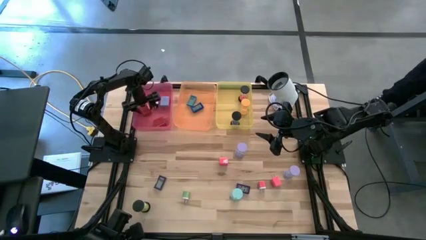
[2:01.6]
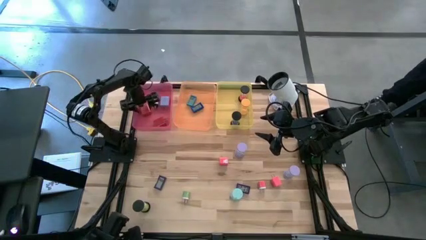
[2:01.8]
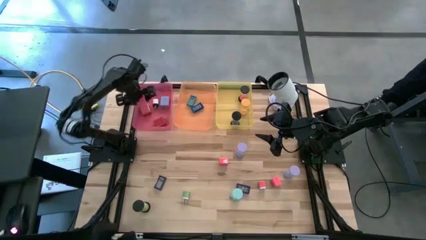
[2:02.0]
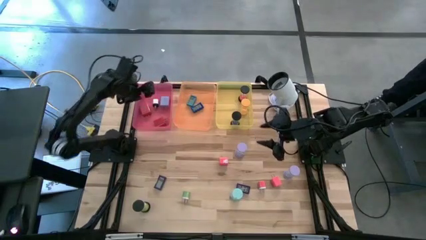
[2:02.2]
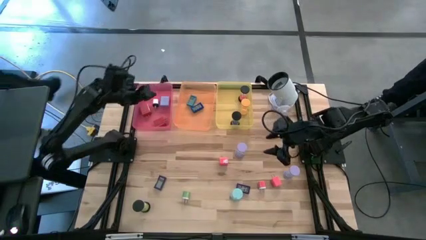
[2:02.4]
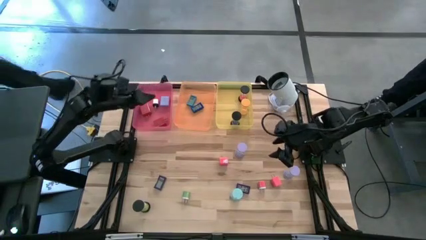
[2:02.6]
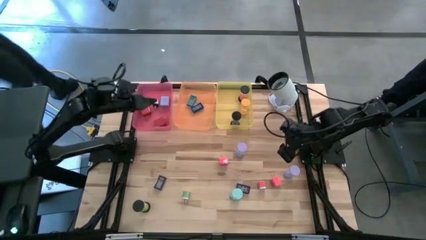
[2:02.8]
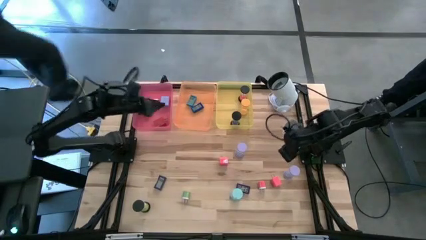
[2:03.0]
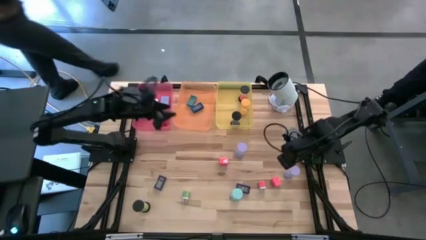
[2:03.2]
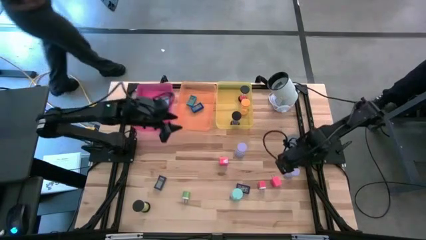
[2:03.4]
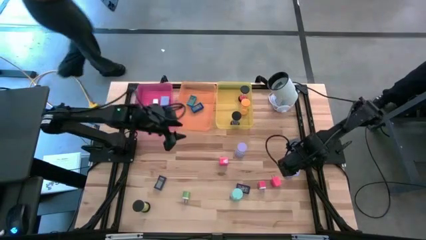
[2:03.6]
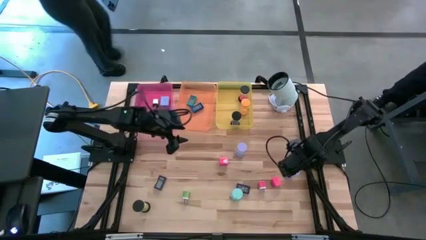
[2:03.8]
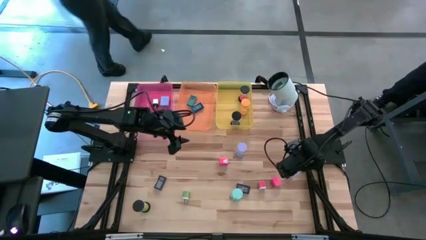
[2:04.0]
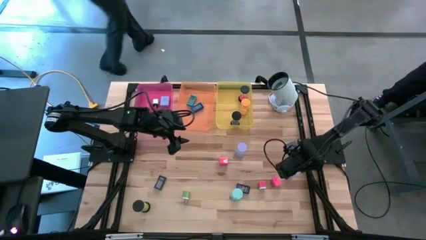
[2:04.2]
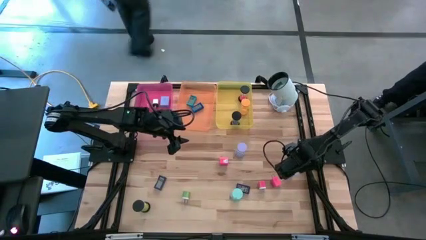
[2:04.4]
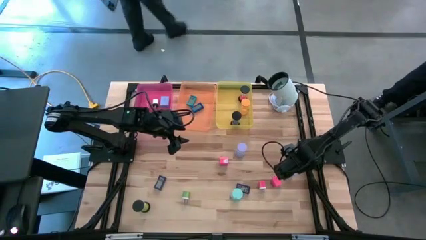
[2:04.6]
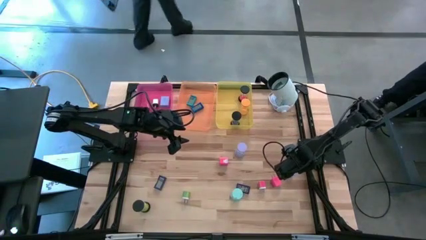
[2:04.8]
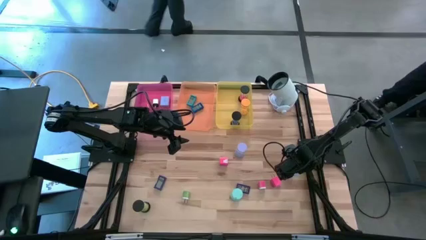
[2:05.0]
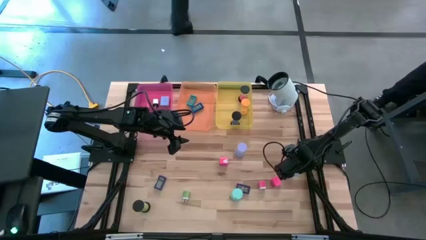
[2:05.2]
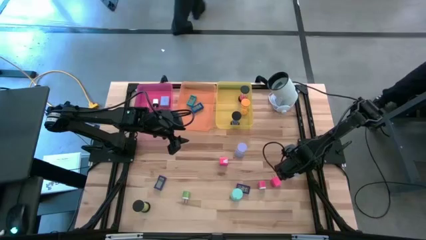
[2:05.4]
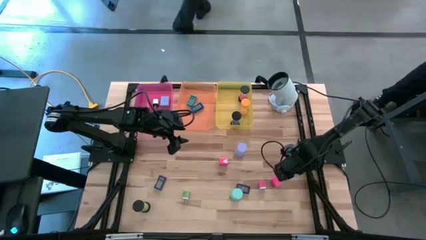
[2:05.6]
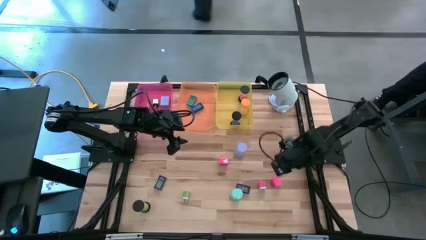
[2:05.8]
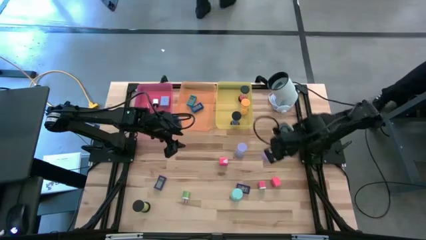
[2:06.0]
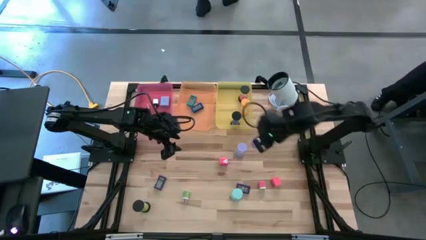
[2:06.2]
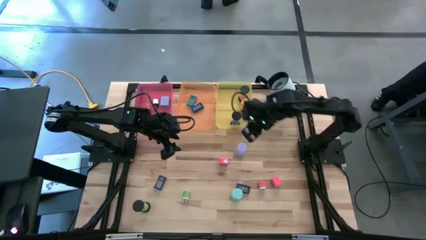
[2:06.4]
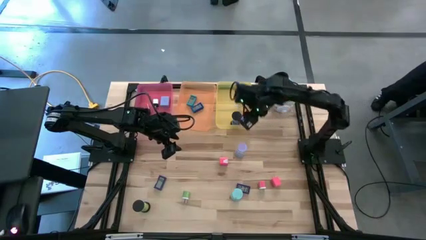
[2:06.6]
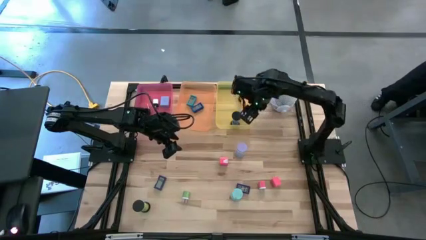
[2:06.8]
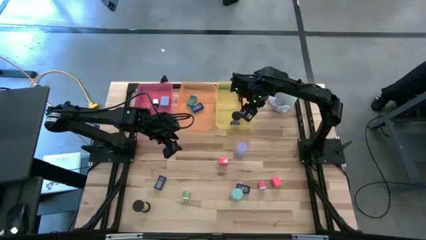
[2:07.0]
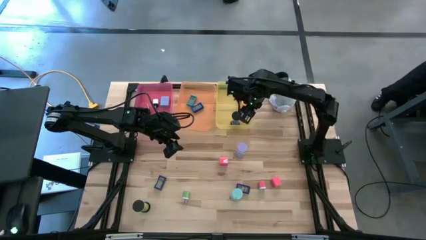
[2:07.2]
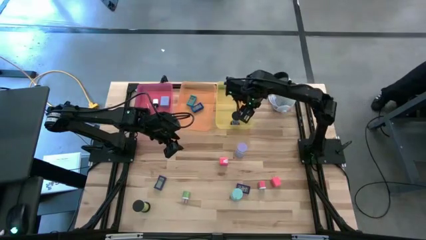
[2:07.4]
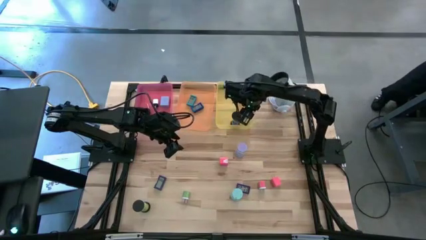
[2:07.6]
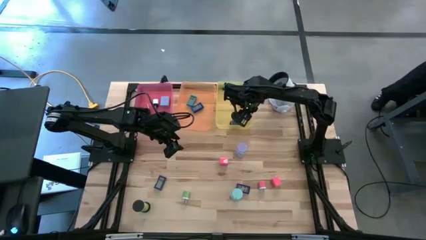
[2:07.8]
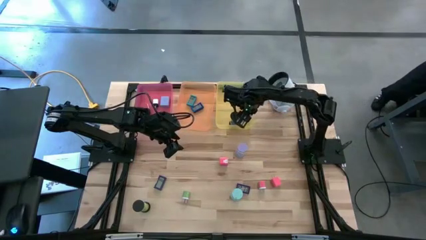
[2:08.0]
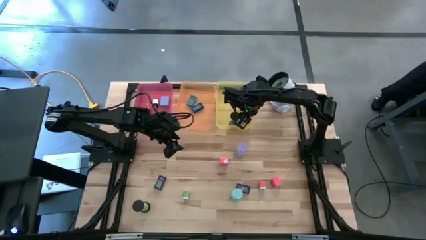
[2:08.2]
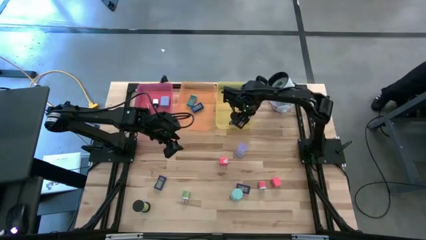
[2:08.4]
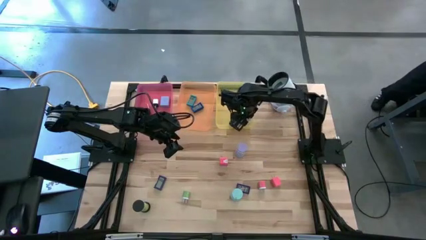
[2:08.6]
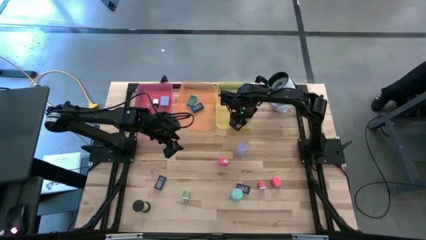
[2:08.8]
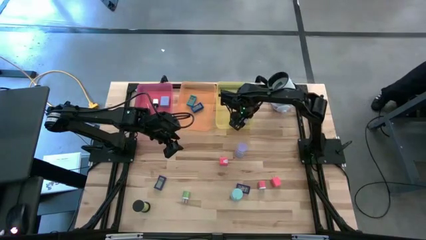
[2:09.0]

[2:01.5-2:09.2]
Task: Pick & Place Office items
Put the bottom violet hourglass into the yellow bin

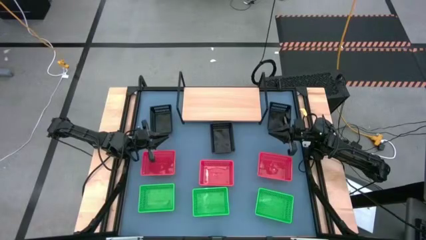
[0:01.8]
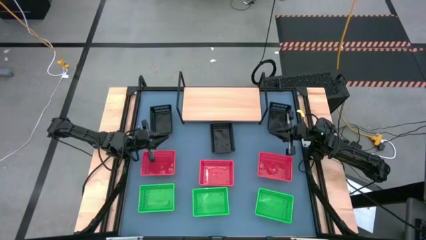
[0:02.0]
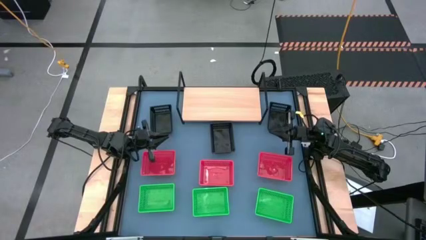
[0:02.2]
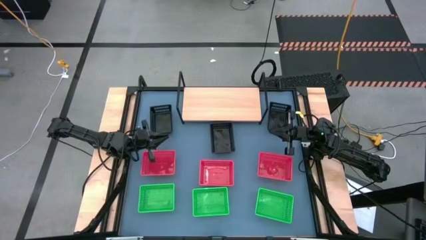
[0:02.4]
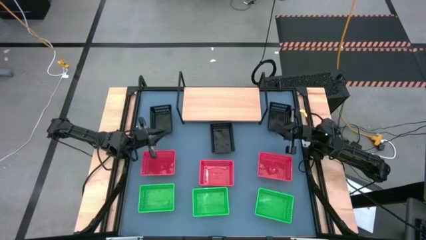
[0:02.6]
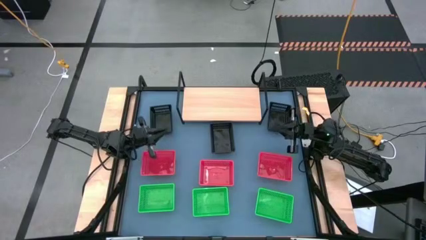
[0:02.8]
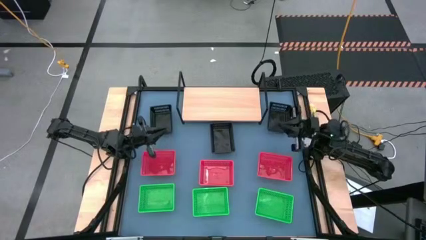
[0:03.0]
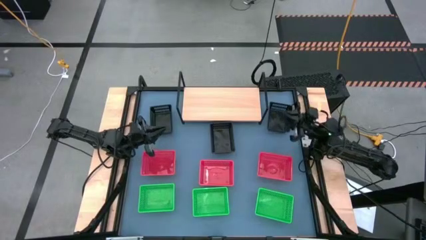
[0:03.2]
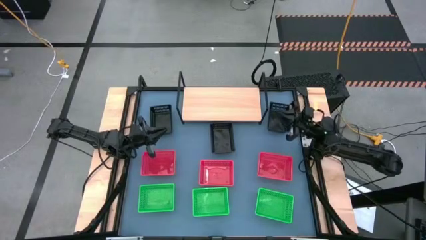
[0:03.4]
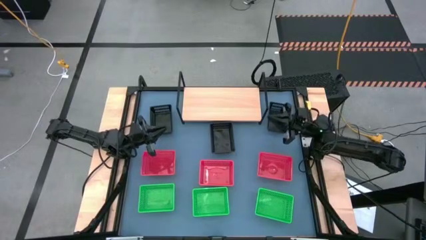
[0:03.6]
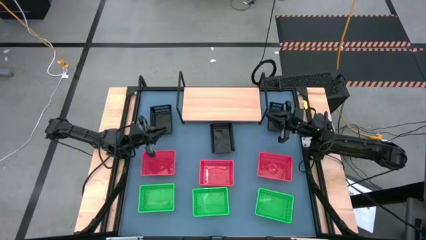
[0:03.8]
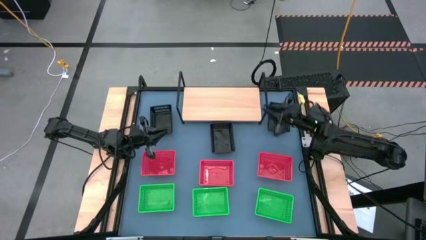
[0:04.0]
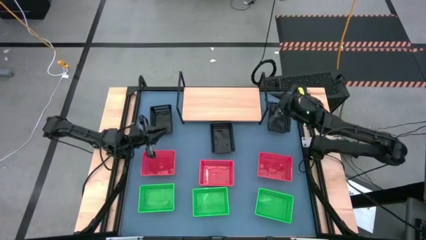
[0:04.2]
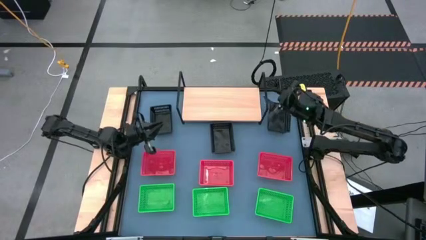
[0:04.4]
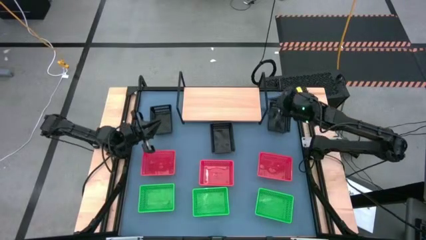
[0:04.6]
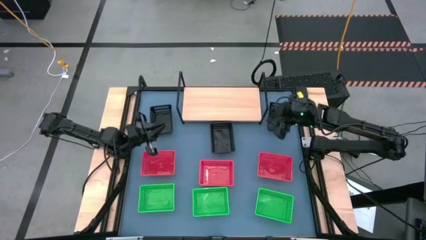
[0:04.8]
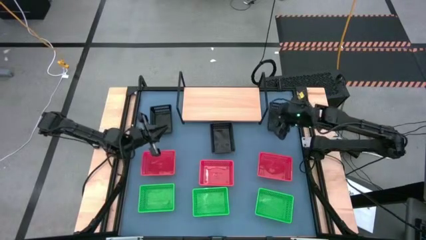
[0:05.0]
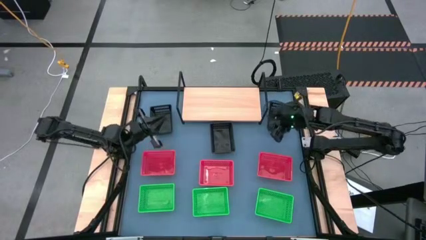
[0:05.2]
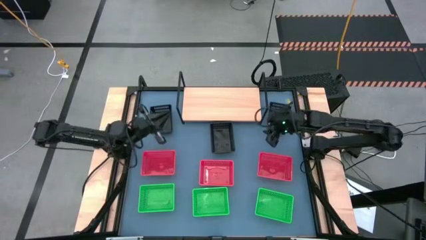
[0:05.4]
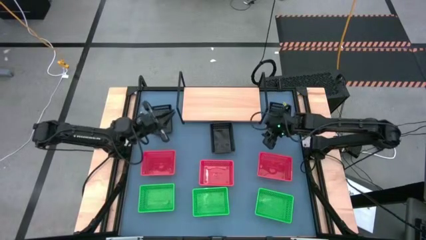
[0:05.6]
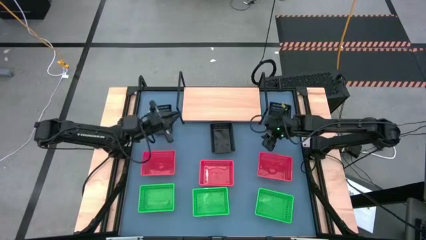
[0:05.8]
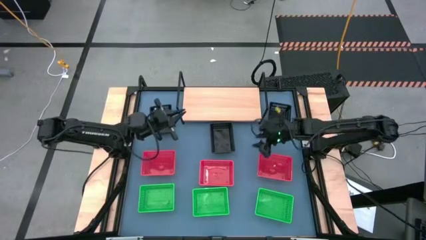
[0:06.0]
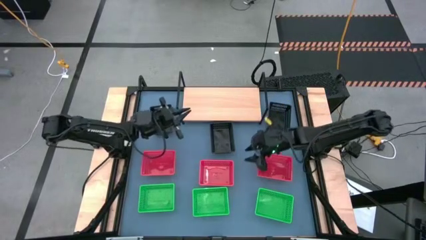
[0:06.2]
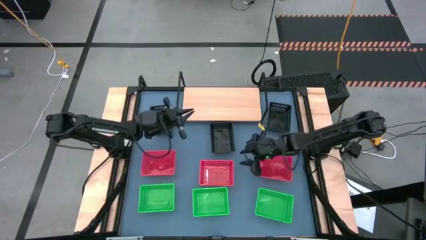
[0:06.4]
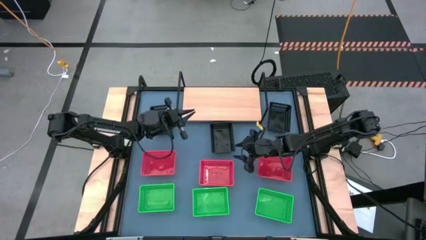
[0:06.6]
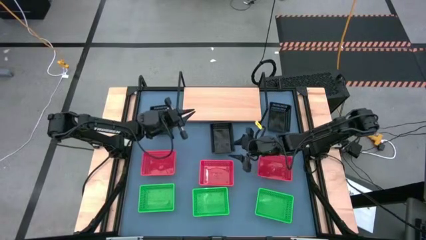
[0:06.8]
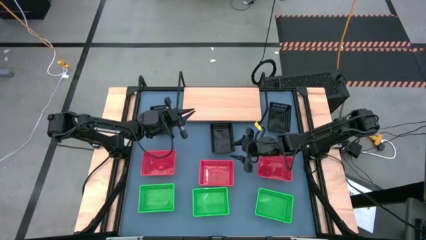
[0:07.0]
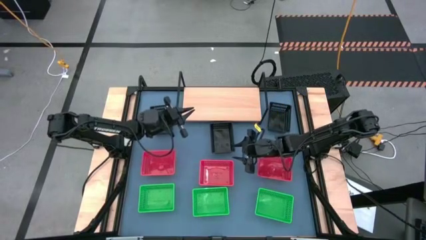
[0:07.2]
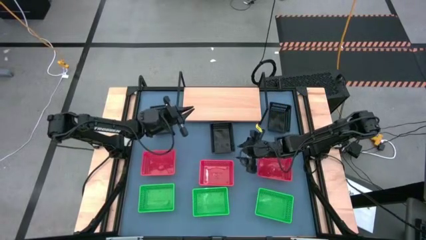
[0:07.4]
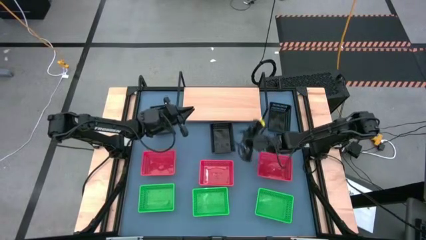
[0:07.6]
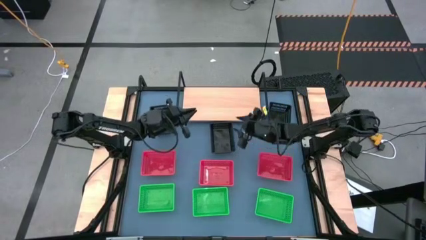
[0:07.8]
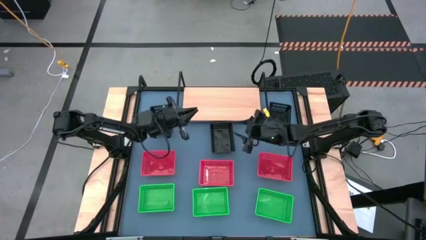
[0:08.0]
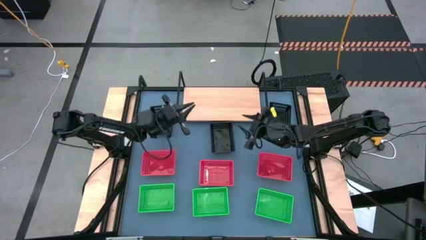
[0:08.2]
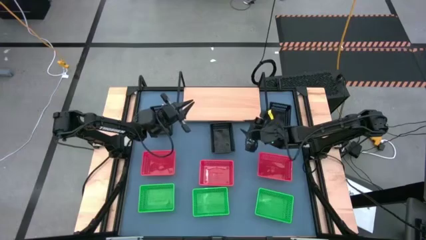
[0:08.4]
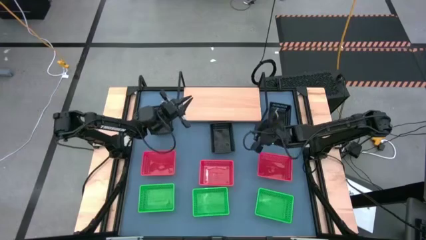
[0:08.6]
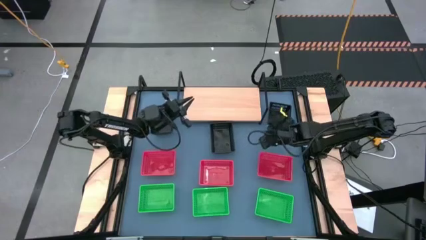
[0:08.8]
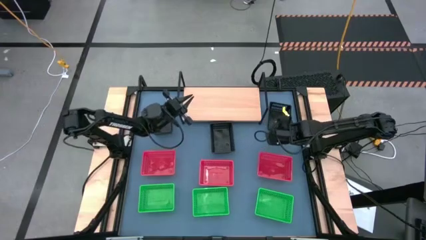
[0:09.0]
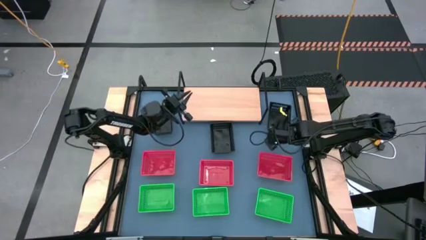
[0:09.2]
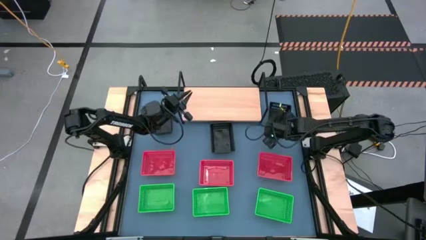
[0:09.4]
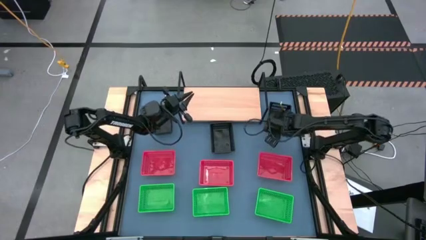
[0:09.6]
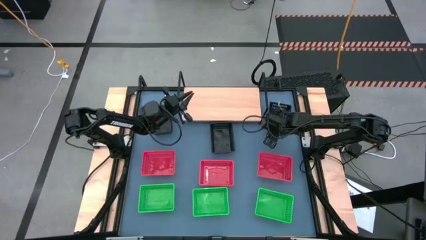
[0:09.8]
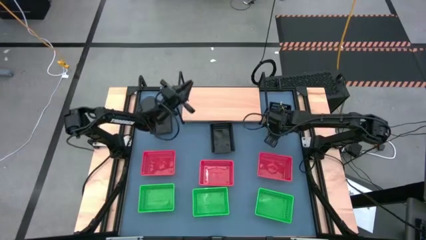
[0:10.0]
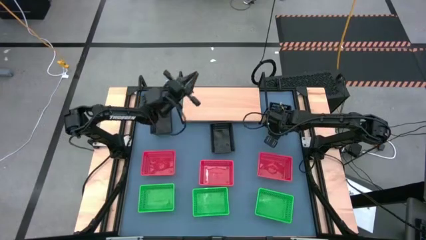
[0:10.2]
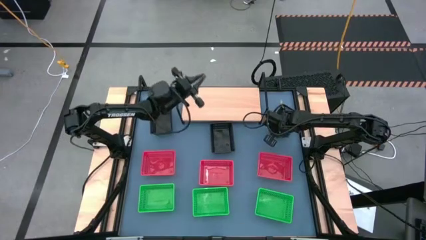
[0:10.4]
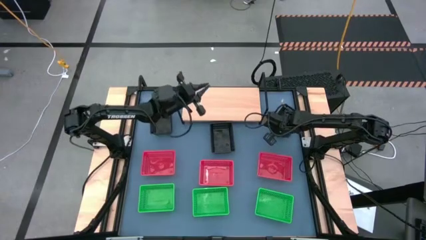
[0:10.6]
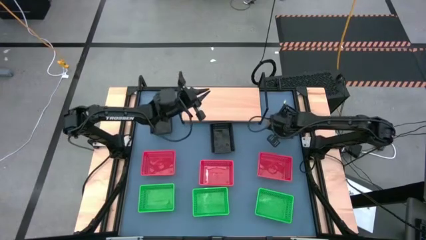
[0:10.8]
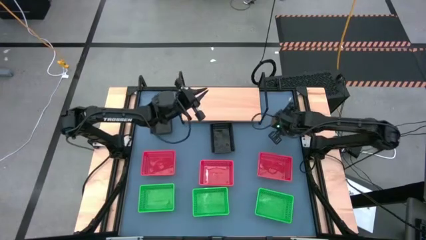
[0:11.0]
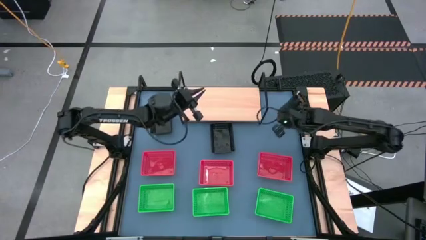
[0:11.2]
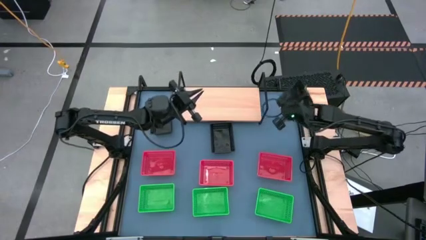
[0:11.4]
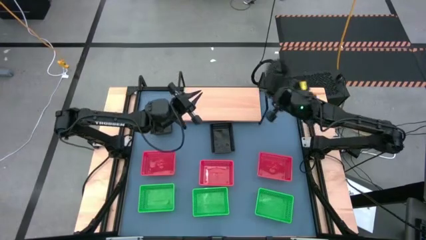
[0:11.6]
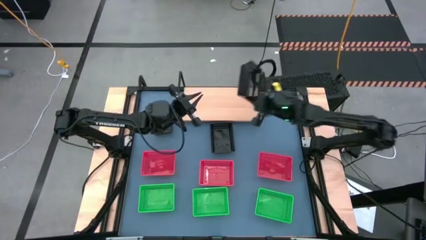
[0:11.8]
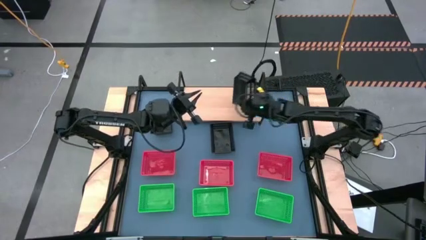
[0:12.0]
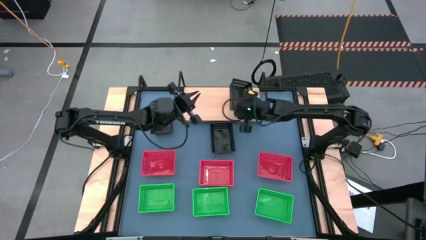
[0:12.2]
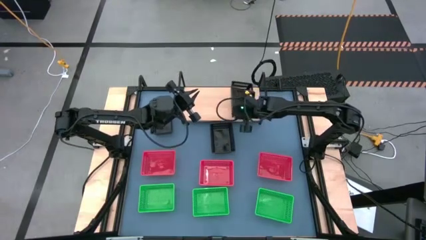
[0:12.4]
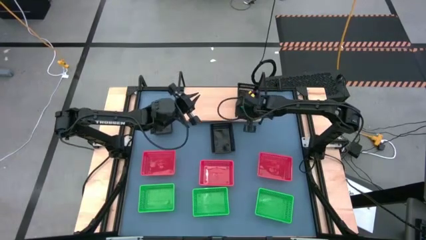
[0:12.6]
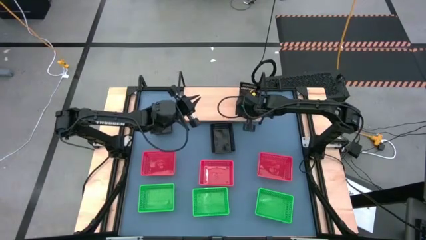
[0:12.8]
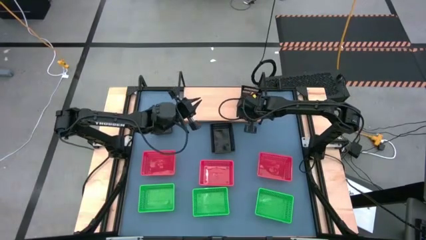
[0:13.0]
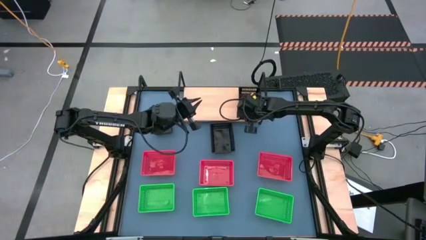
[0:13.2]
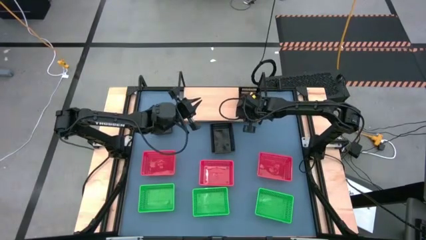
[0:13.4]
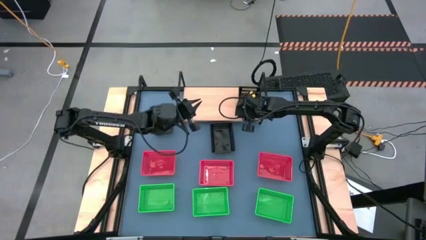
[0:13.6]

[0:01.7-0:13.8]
Task: Stack baskets on shelf by color
Put the top right black bin on the shelf
